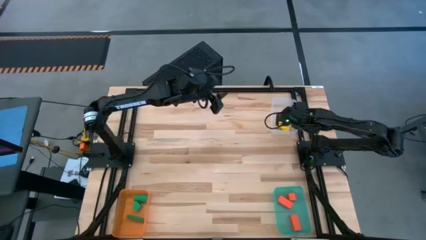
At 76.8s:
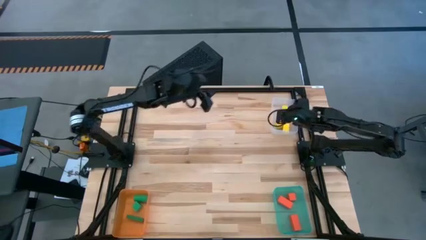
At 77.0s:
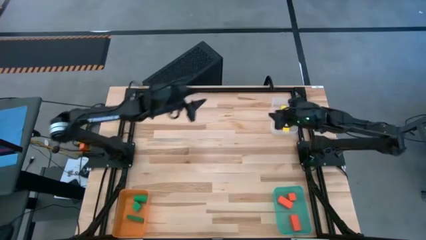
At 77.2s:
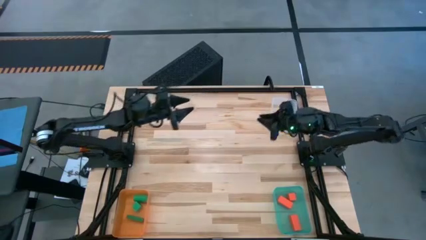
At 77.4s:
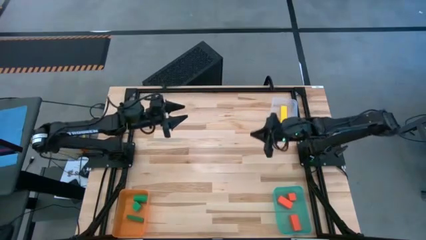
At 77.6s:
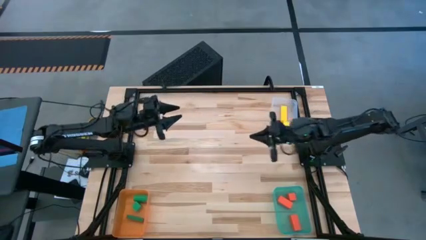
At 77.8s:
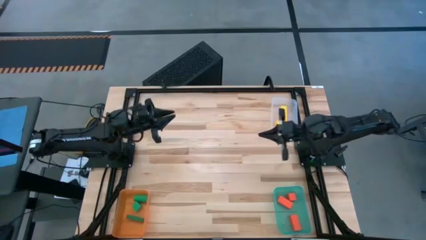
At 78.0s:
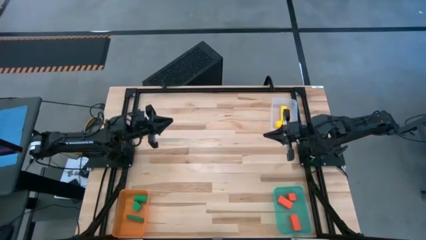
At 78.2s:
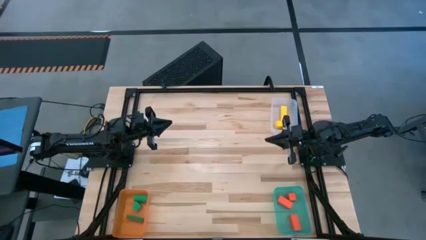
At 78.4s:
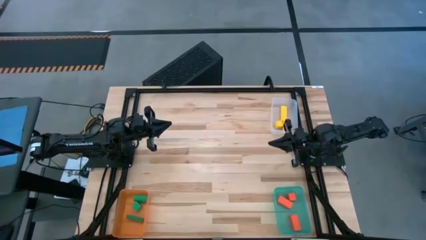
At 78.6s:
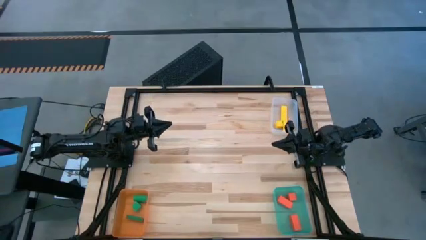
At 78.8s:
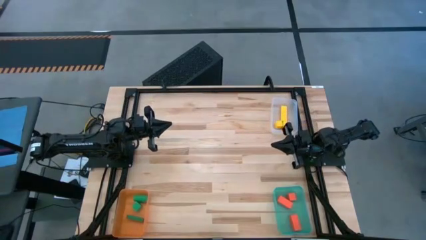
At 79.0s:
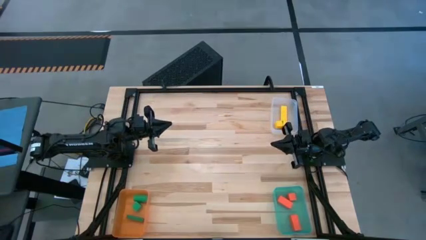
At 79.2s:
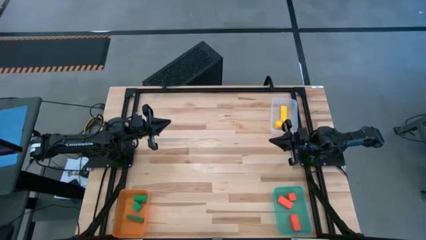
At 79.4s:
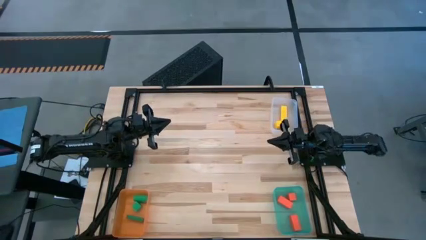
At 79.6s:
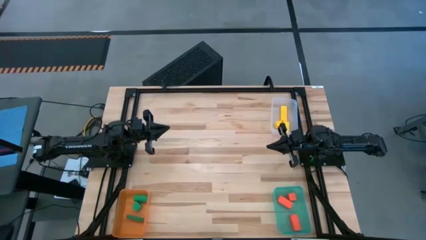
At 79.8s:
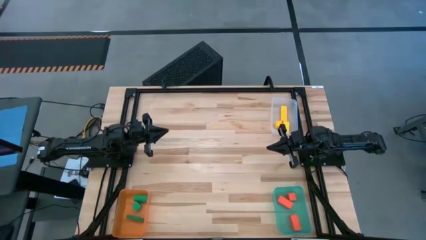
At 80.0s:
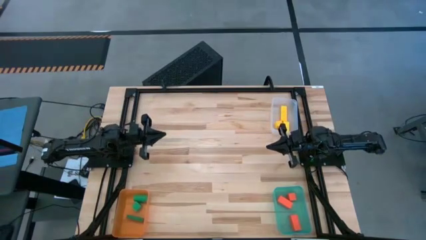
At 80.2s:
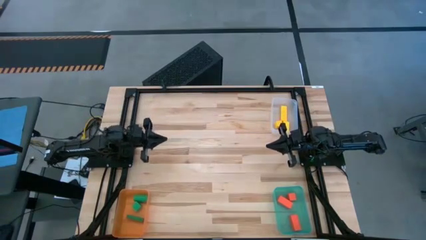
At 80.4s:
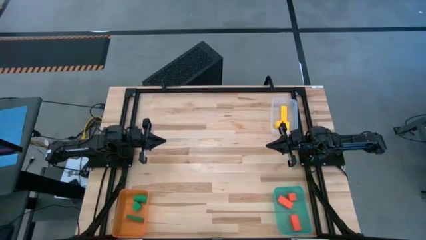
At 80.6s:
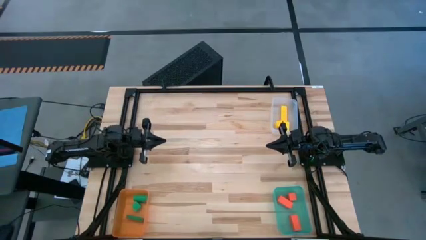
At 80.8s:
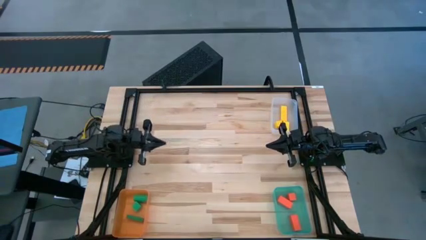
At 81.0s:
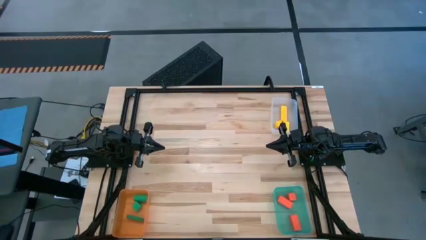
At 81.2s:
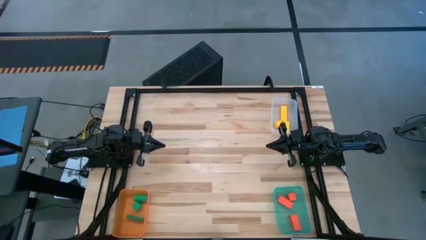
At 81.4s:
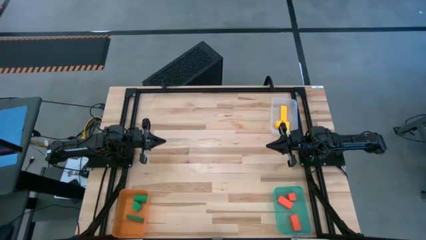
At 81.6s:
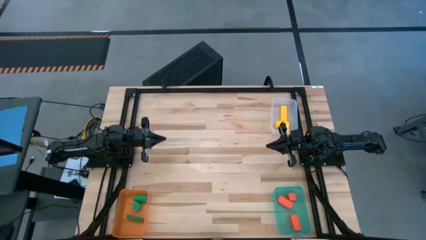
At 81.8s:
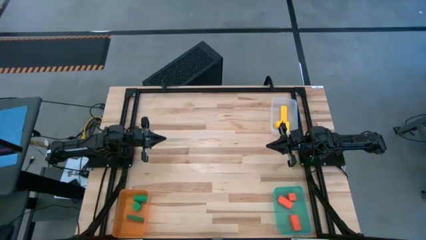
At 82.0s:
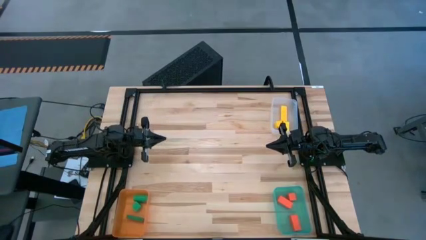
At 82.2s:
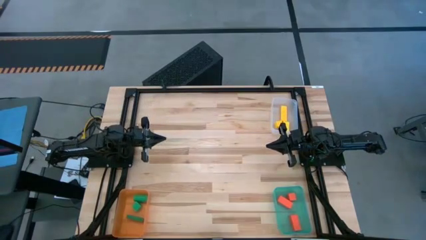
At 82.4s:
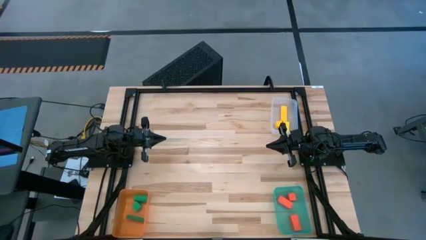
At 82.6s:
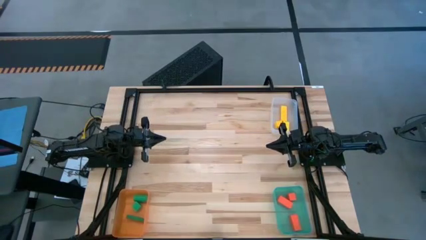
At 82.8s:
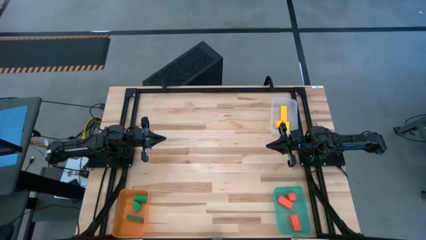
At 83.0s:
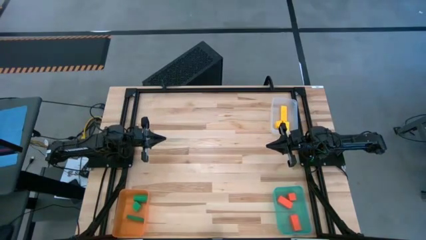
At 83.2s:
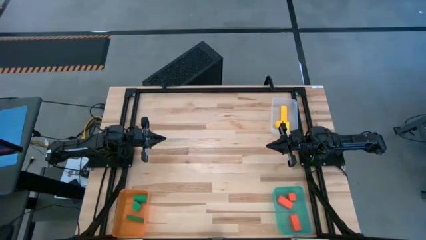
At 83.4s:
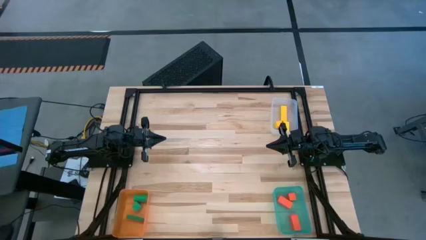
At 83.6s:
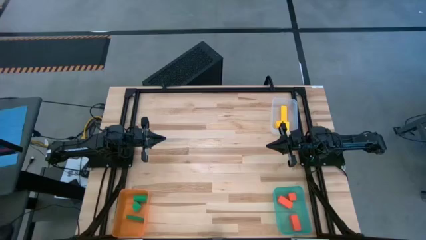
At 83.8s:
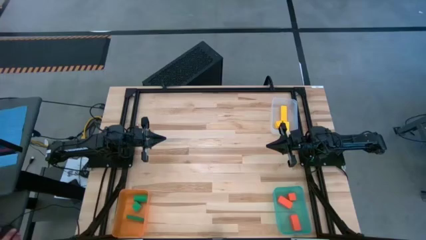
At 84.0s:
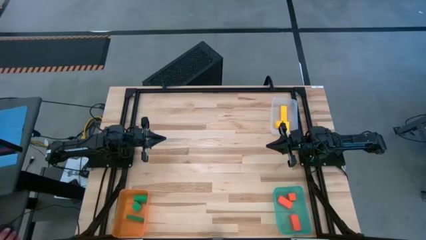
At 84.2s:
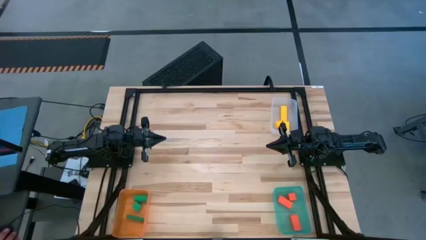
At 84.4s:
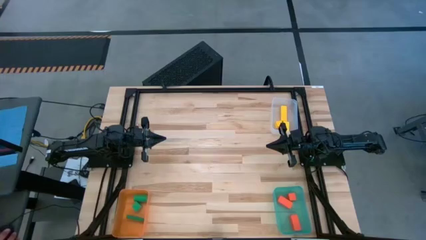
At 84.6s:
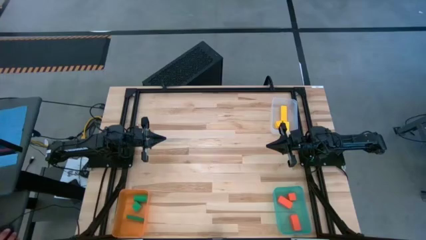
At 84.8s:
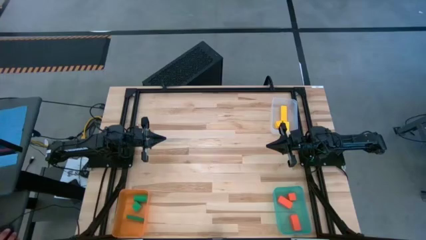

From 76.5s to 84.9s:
Task: Sort & place blocks by color
Return to Home Position

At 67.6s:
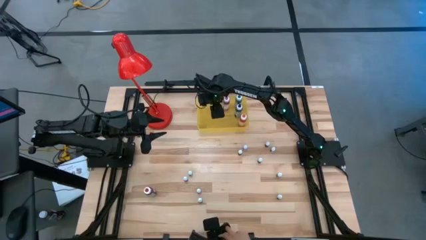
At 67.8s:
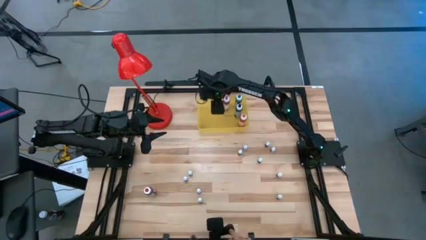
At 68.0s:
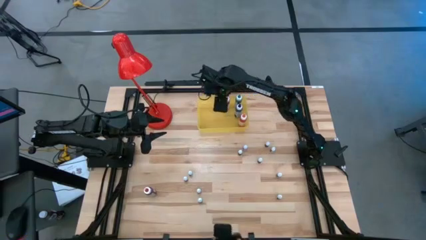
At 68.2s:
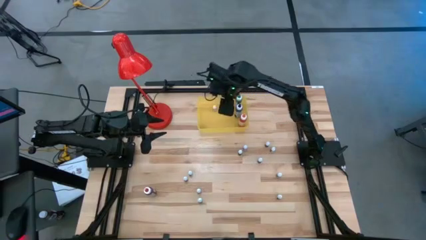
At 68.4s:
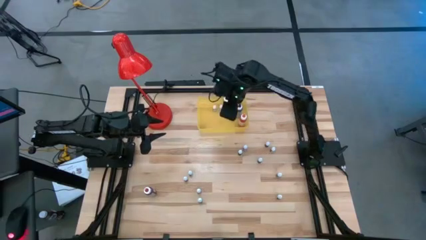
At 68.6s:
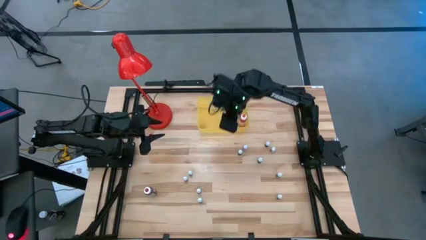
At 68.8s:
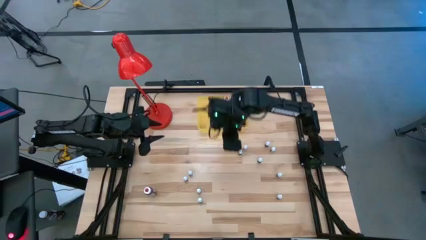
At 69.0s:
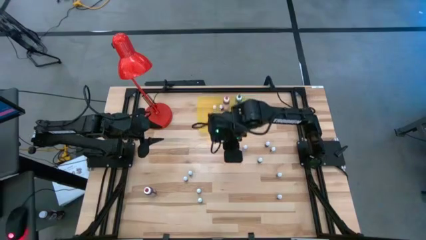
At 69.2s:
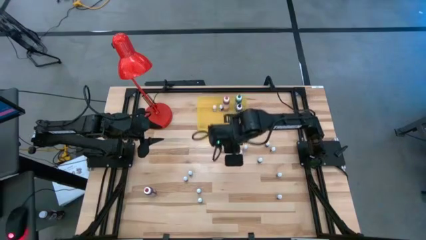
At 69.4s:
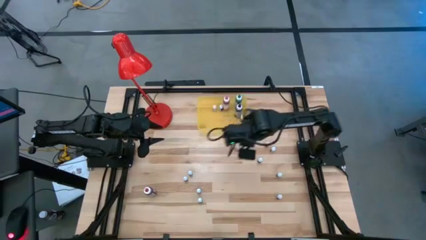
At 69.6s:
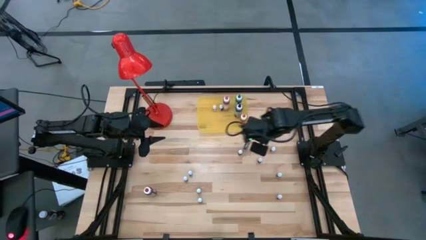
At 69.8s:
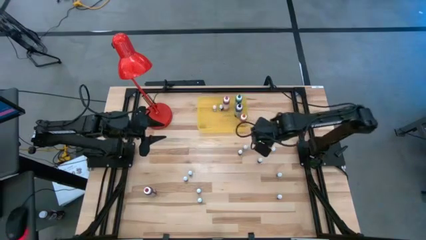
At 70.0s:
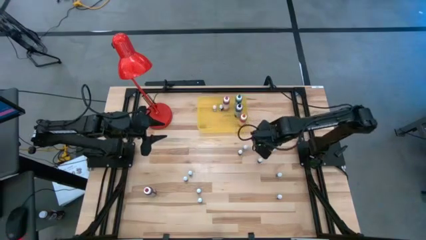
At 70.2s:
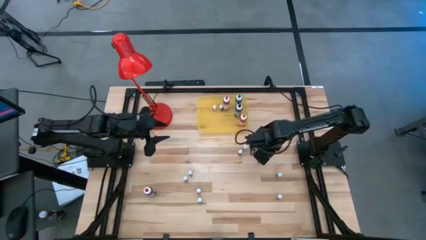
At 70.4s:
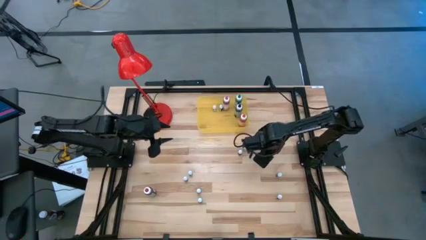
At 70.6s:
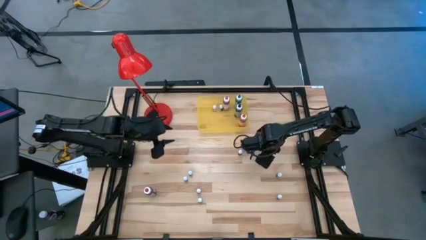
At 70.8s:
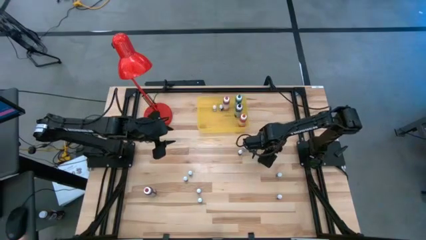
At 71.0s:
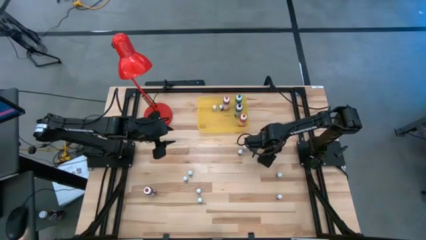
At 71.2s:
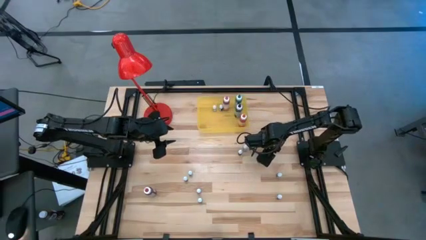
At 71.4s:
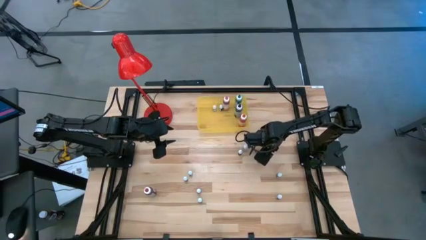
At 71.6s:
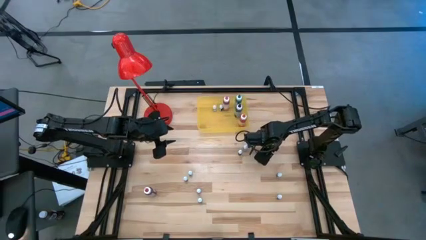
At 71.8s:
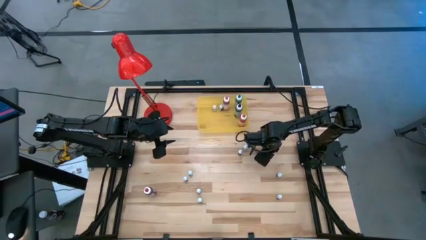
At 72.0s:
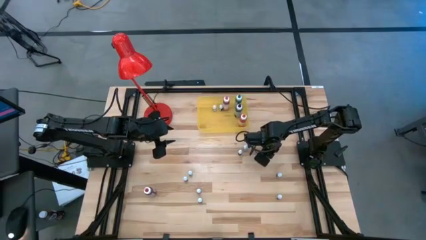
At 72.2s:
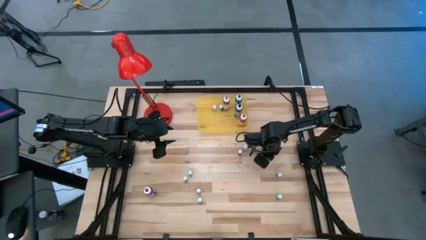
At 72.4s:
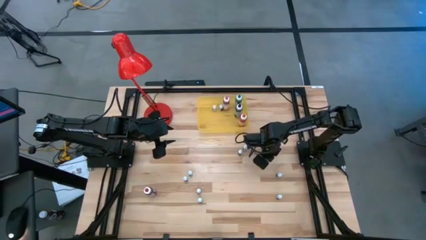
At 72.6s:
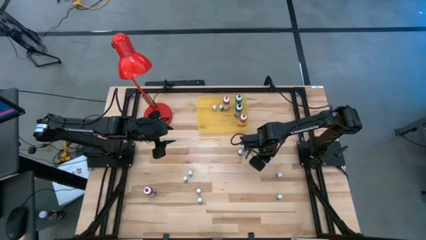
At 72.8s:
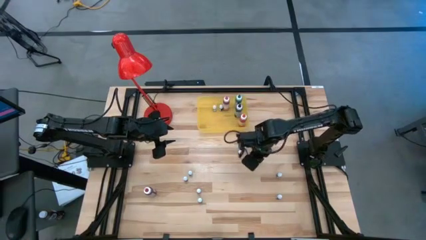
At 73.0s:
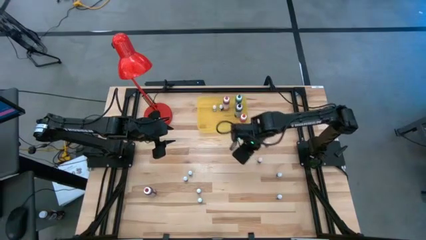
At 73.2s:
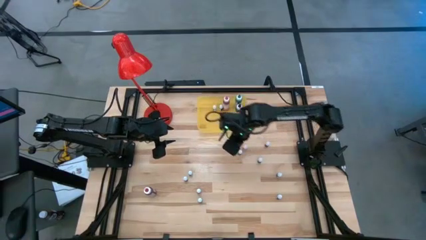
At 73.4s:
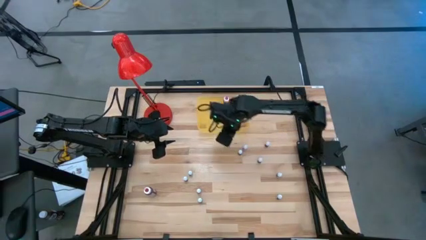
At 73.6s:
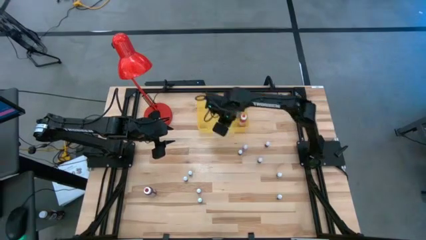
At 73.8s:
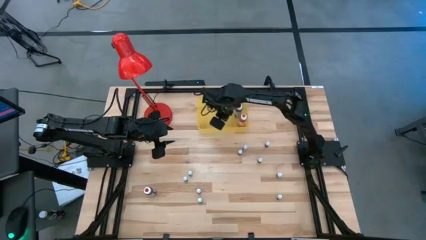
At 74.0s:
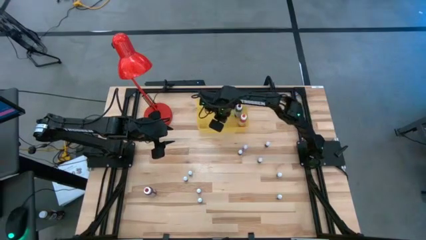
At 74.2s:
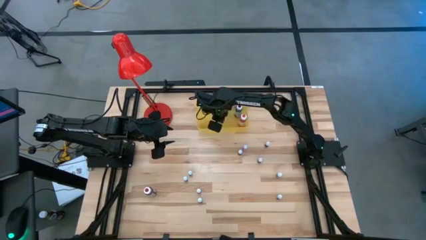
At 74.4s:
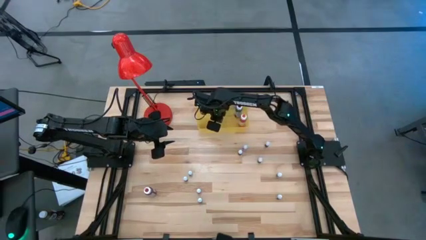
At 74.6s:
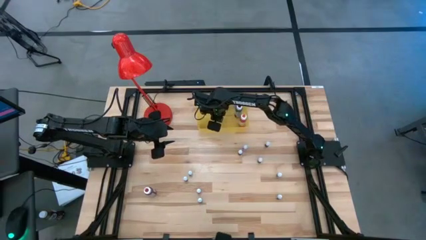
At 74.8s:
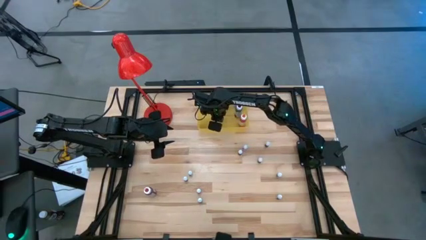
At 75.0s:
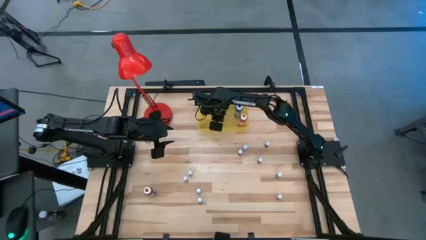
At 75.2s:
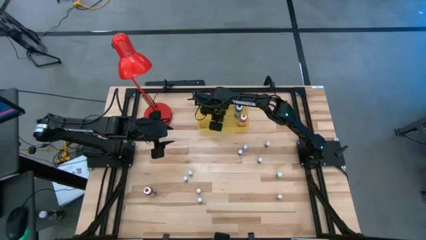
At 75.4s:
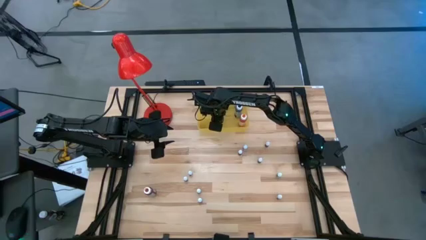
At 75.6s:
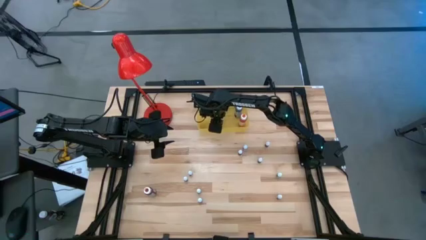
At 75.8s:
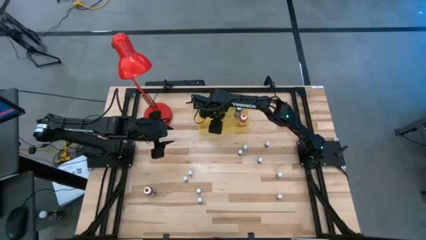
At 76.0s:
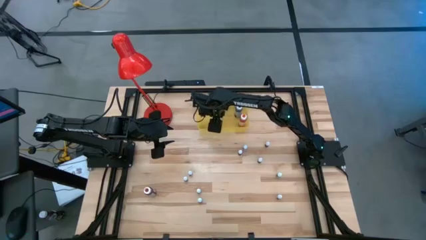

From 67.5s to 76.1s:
Task: Pick & Place food coloring
Put the small brown food coloring bottle into the yellow bin
